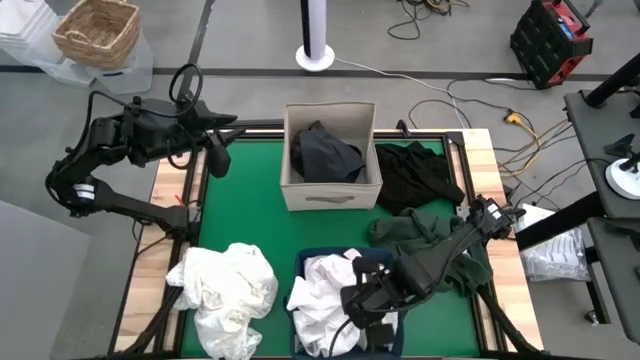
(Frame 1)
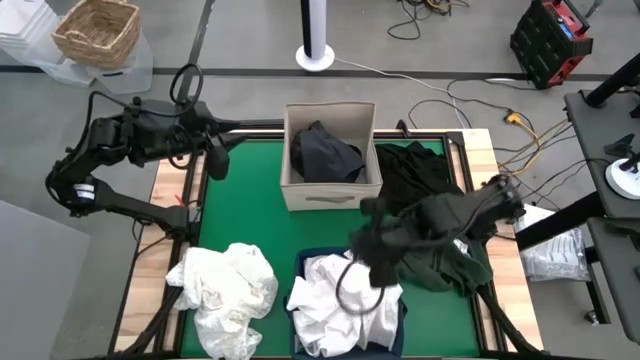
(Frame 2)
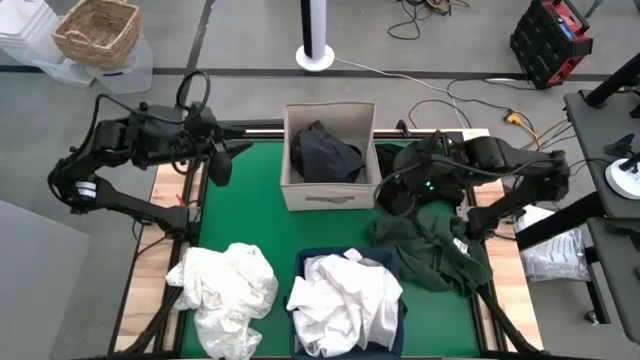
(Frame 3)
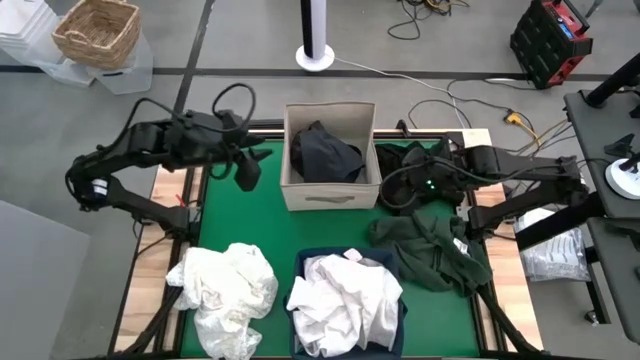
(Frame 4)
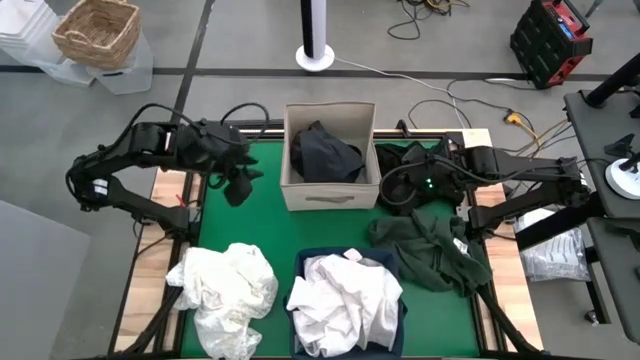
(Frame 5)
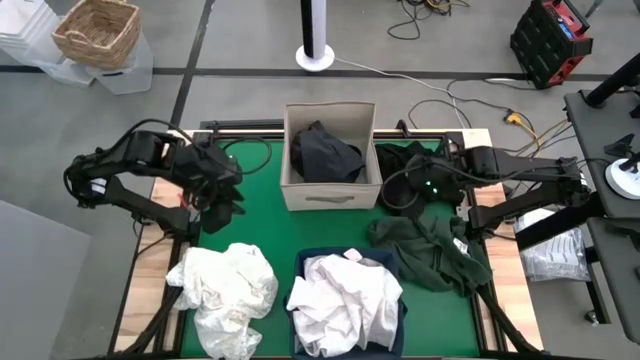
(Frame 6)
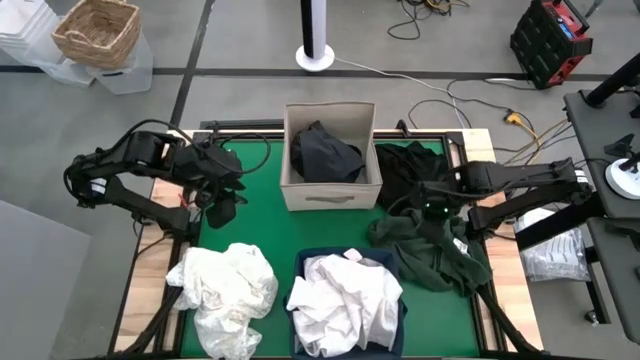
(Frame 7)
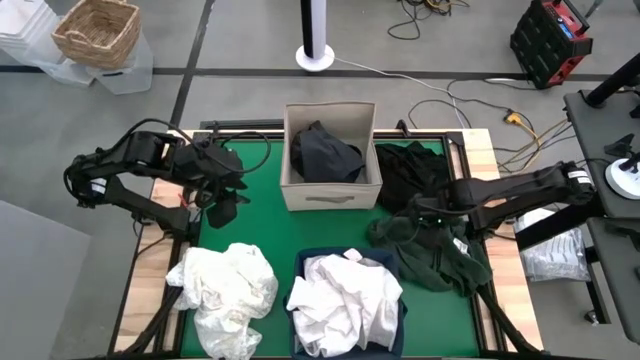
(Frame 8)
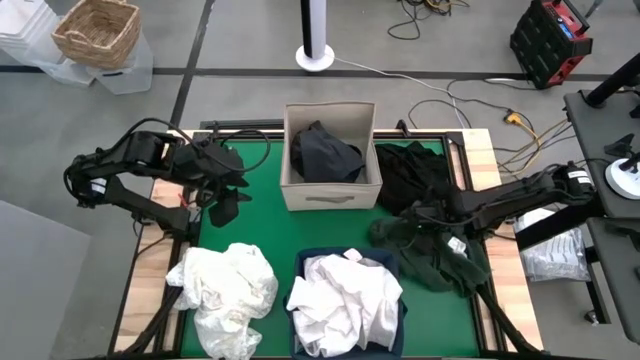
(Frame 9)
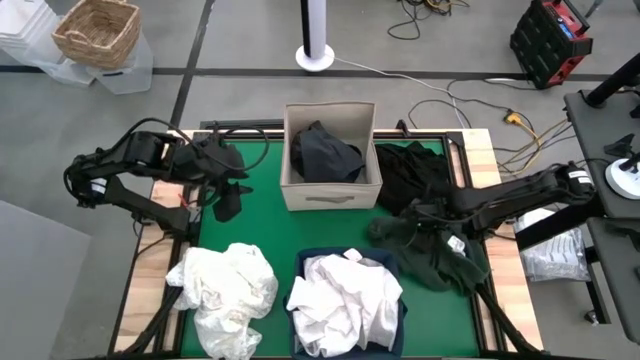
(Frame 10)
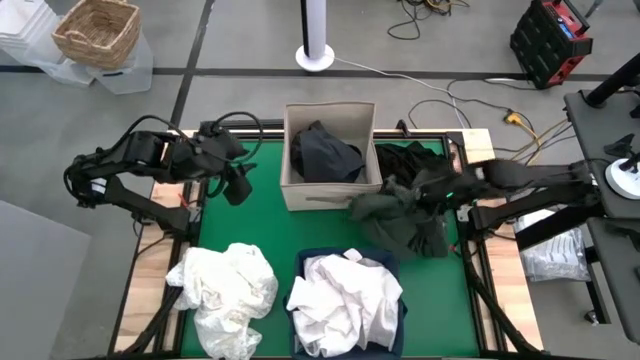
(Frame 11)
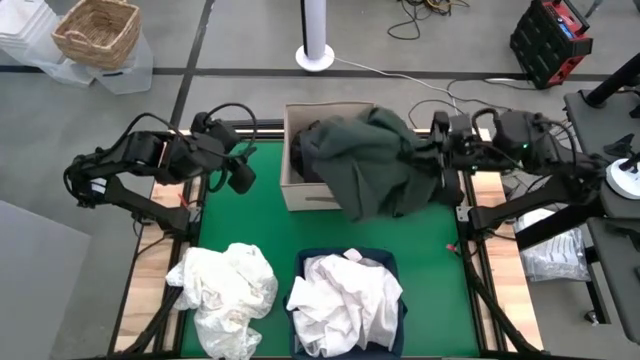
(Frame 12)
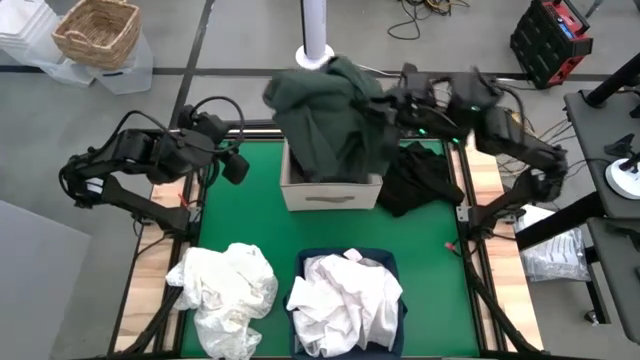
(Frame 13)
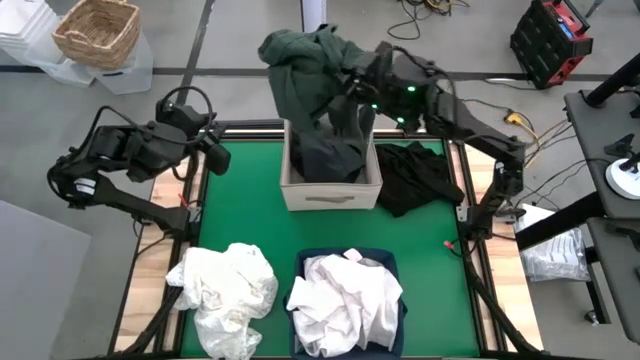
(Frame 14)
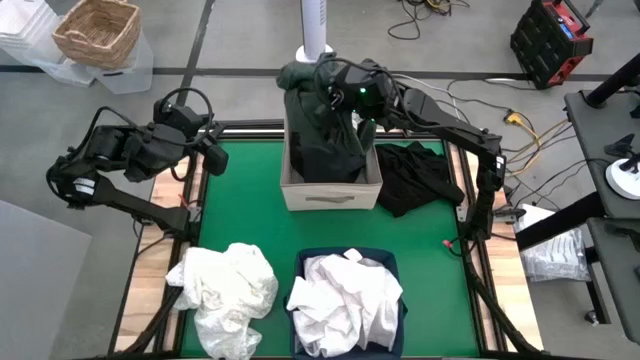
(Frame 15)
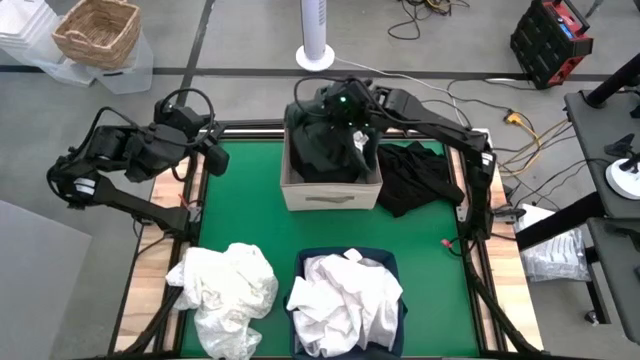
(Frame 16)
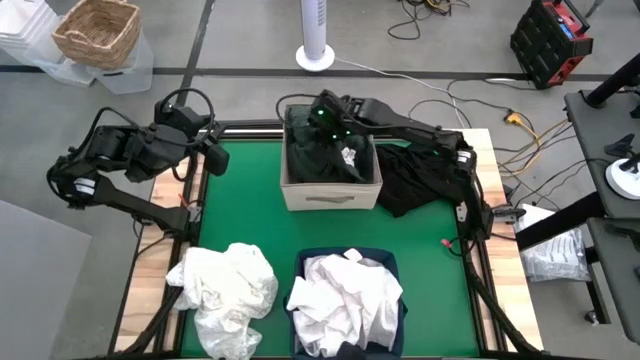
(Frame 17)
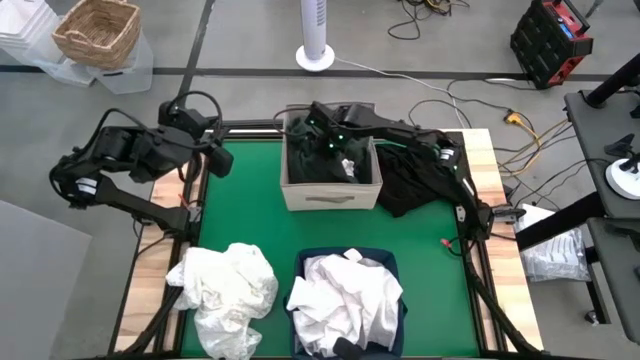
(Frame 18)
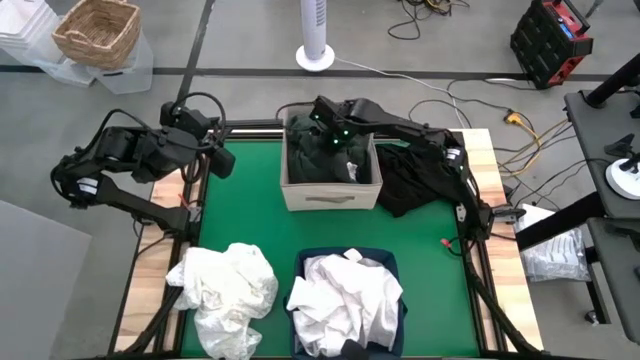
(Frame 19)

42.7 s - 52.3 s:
Put the green polo shirt into the white laundry bin

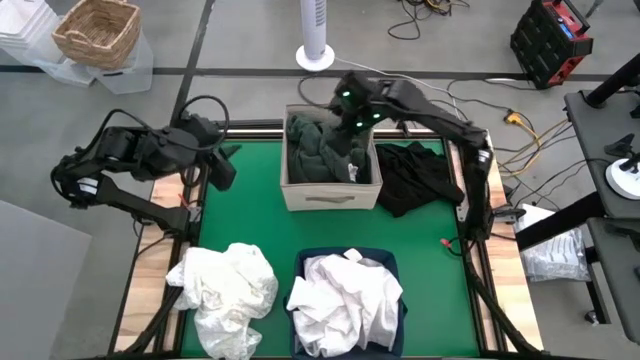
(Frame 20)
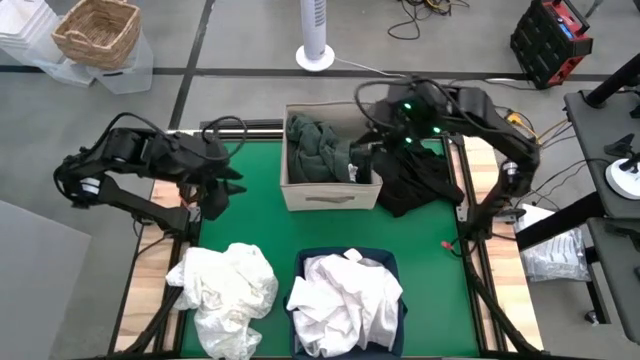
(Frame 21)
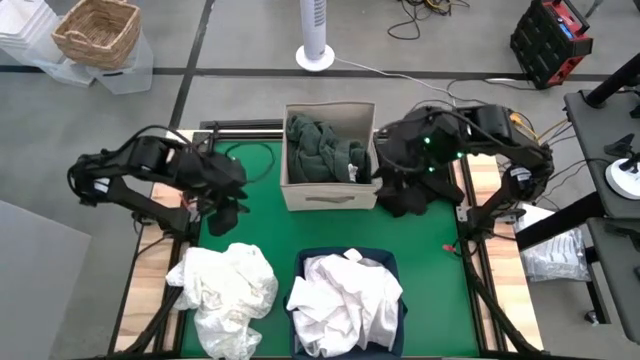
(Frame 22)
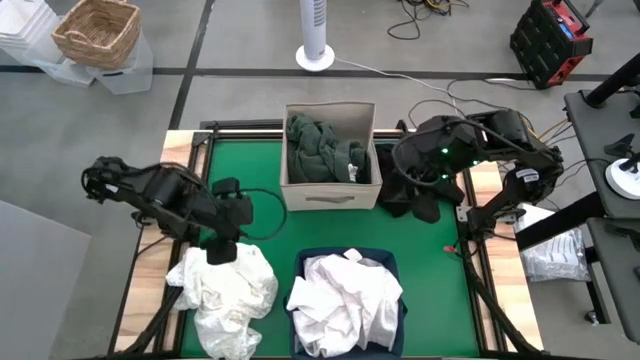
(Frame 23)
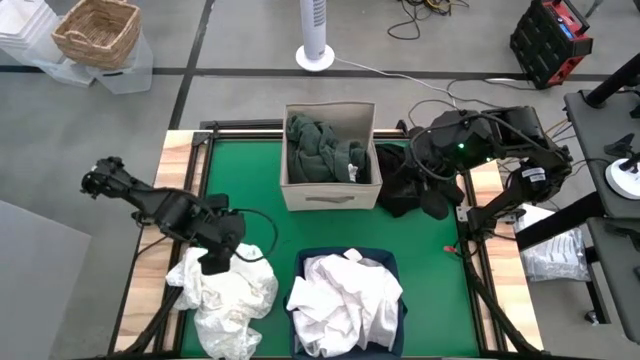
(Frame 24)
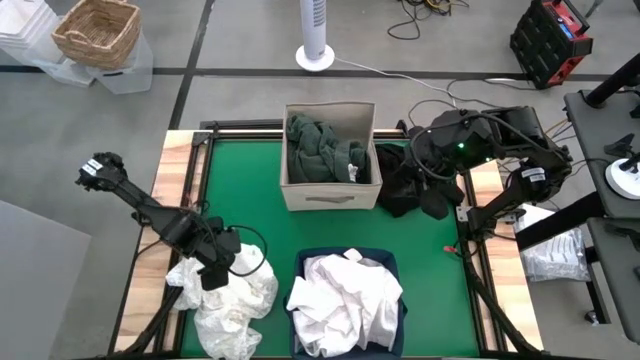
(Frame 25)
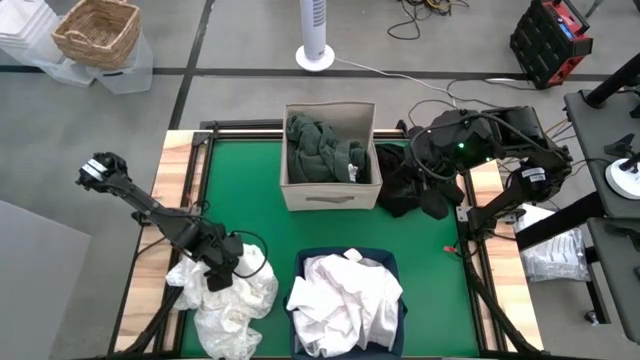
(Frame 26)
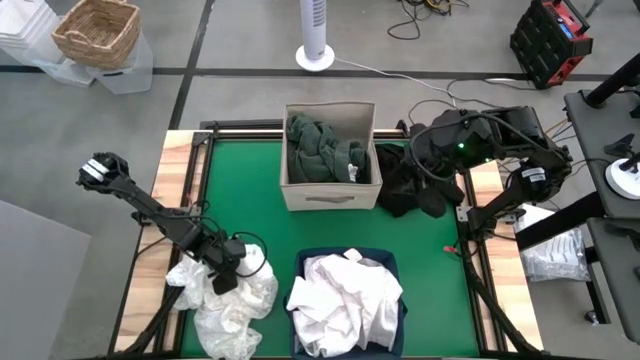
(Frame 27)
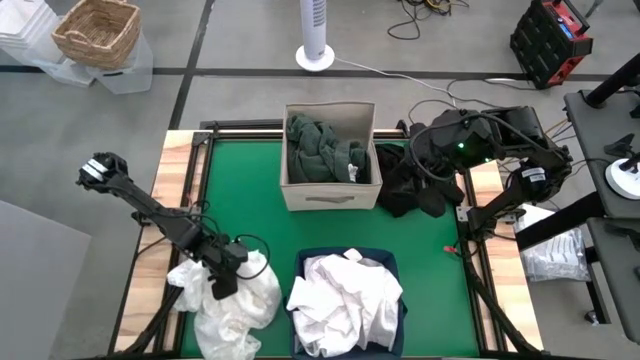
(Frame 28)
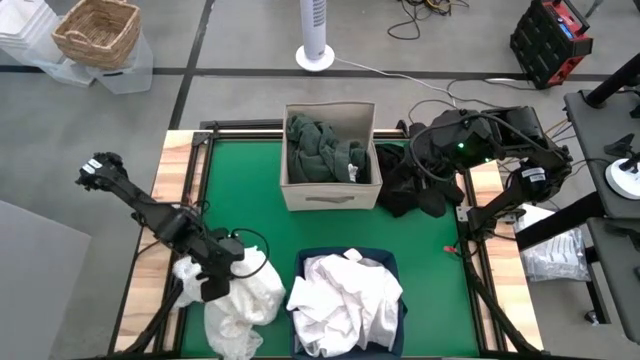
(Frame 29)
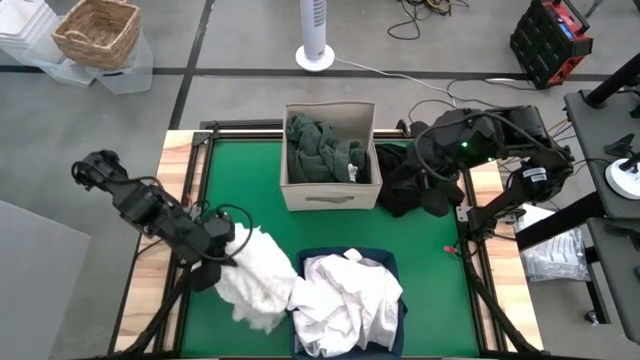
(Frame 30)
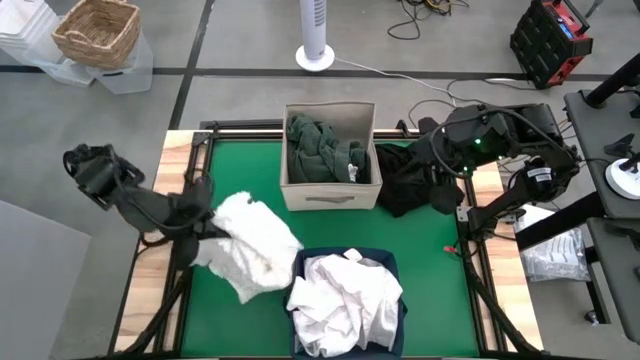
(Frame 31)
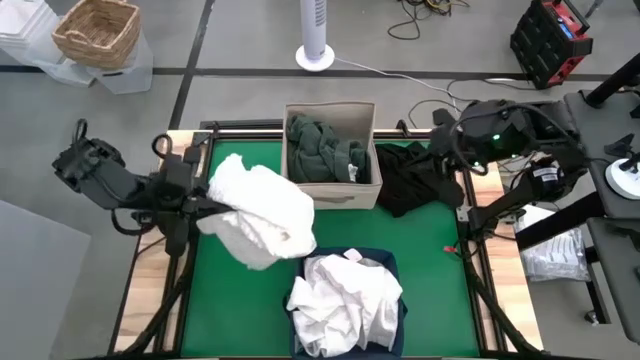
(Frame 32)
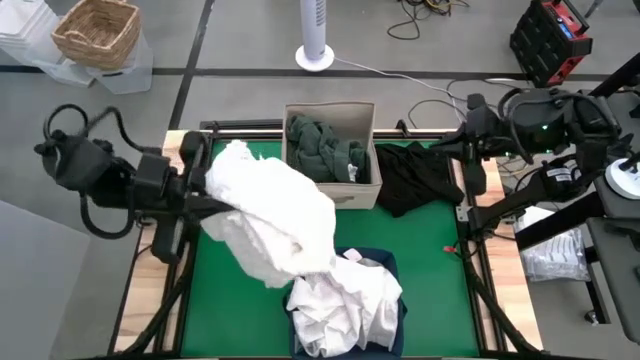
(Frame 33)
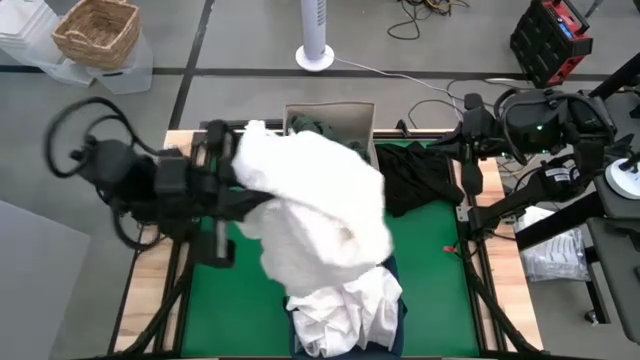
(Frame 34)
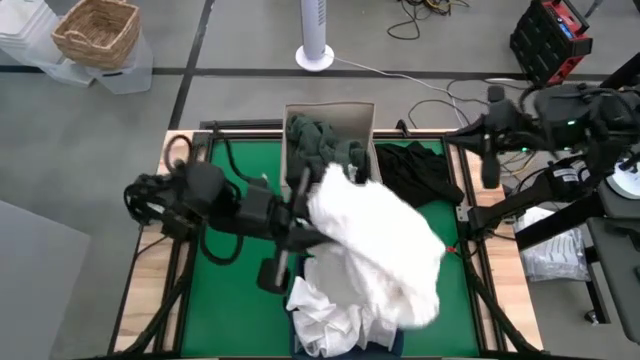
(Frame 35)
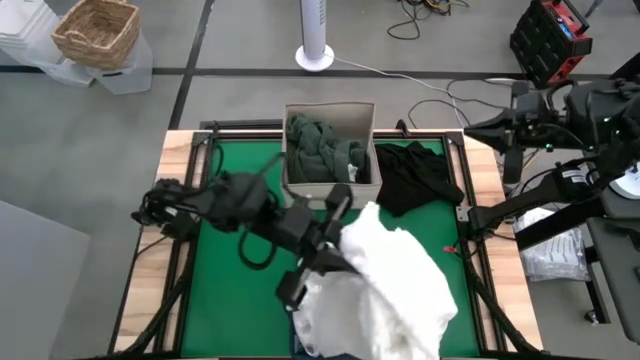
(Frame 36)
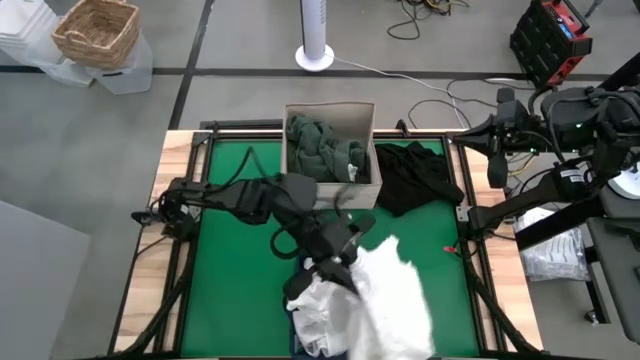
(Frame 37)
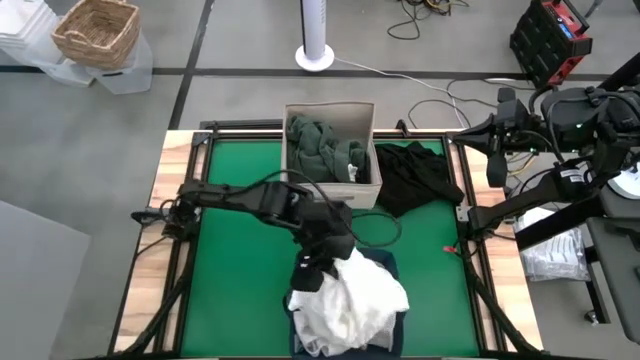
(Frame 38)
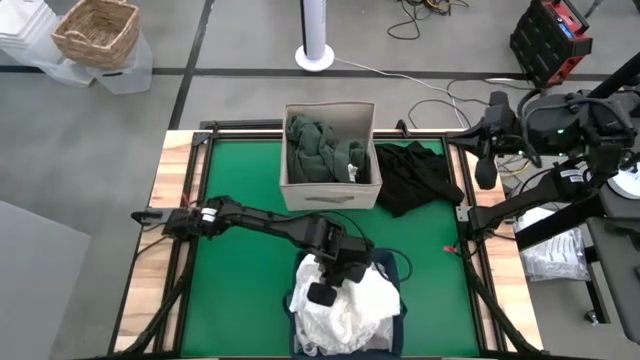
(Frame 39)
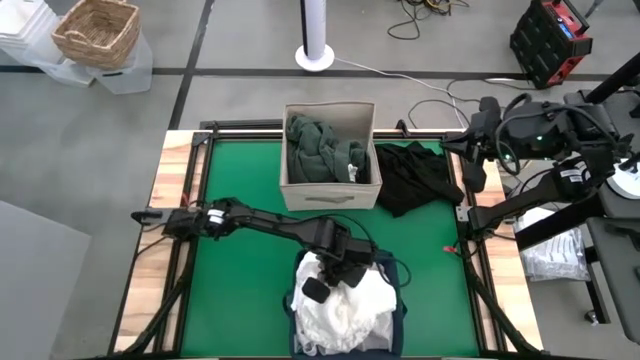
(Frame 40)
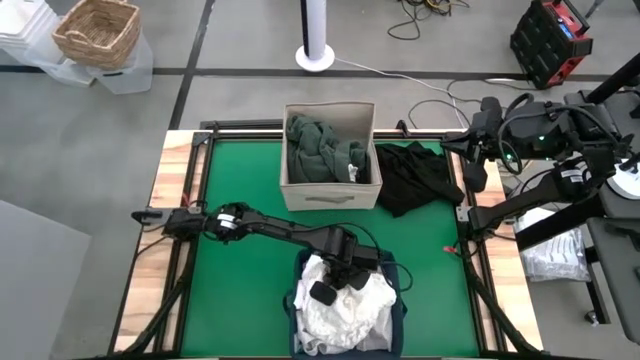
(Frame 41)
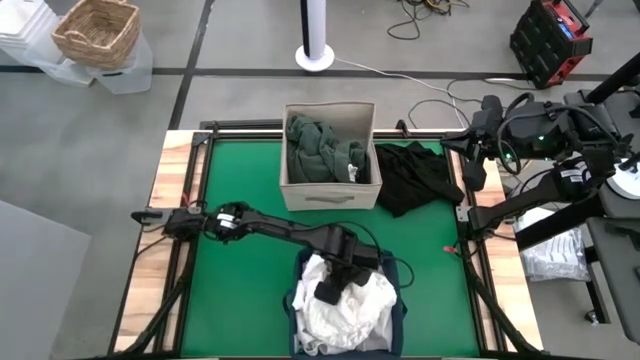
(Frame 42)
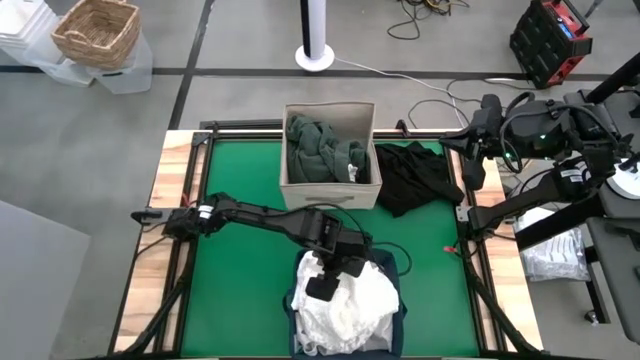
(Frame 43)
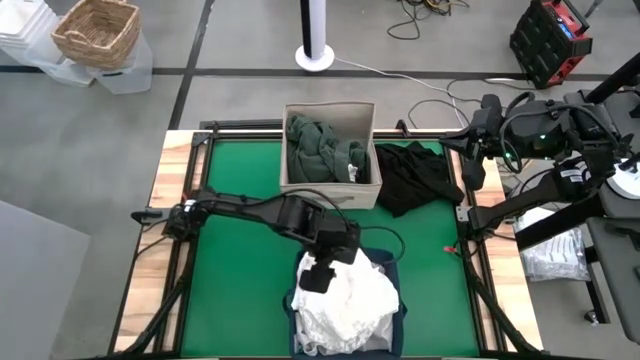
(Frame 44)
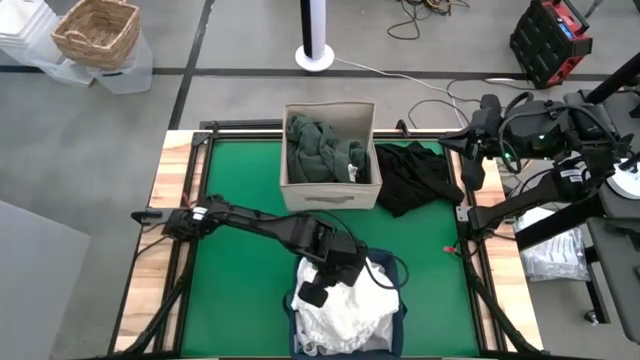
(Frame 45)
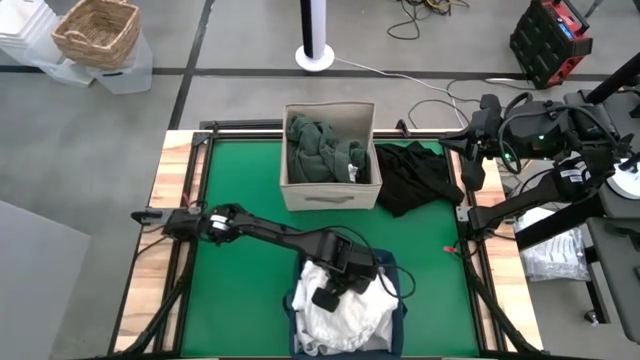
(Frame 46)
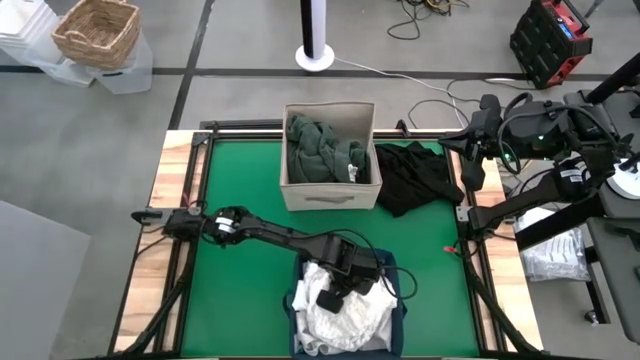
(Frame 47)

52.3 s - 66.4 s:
Put the white dress into the blue laundry bin
